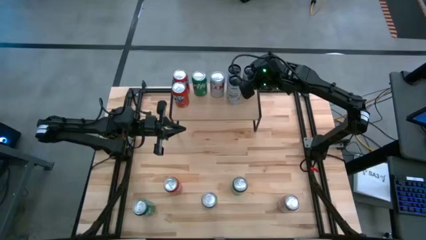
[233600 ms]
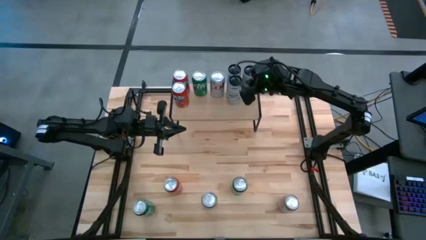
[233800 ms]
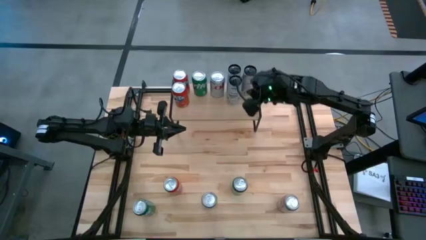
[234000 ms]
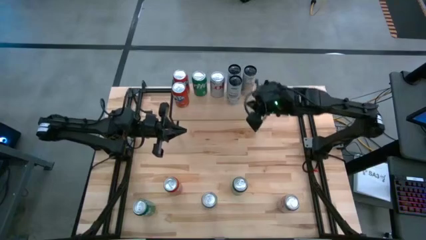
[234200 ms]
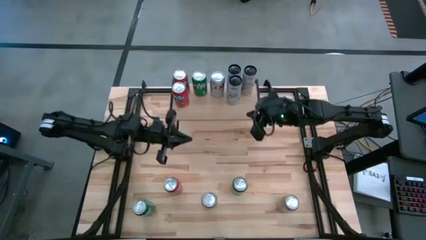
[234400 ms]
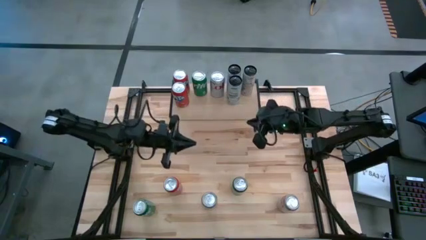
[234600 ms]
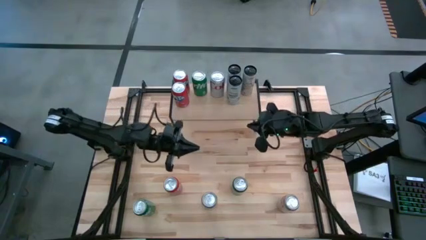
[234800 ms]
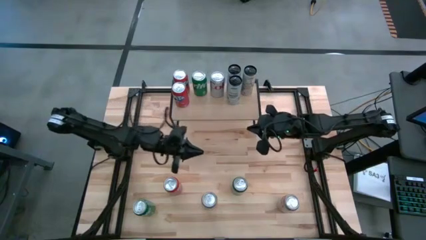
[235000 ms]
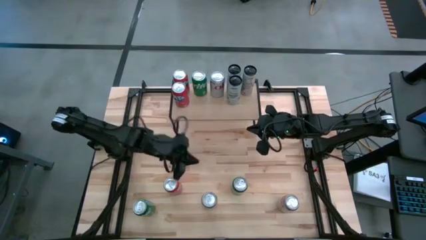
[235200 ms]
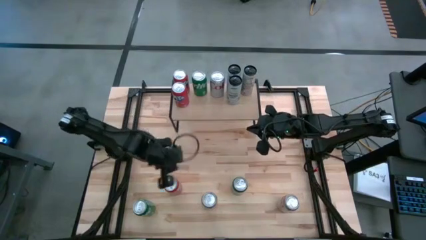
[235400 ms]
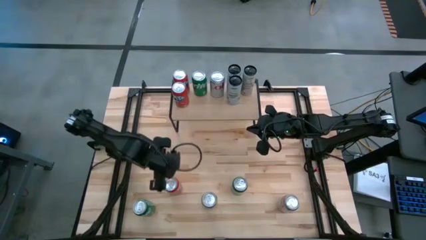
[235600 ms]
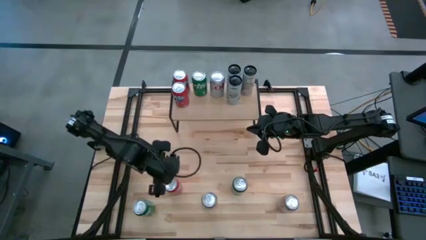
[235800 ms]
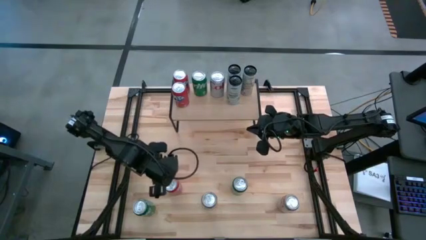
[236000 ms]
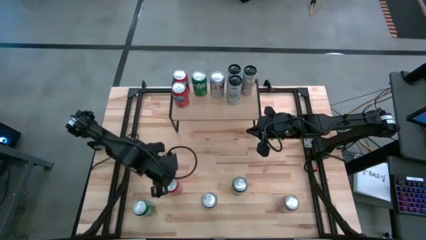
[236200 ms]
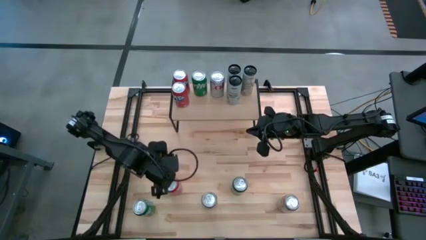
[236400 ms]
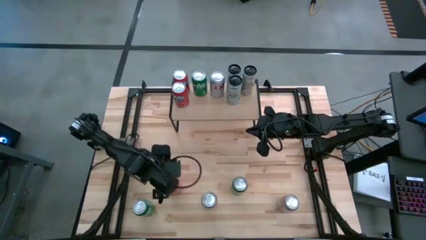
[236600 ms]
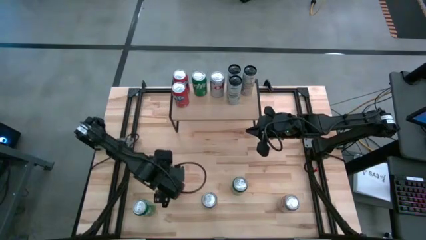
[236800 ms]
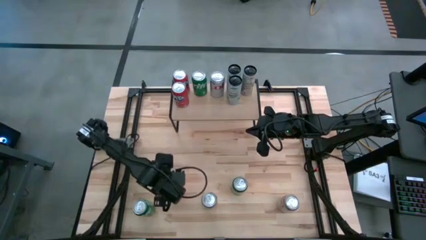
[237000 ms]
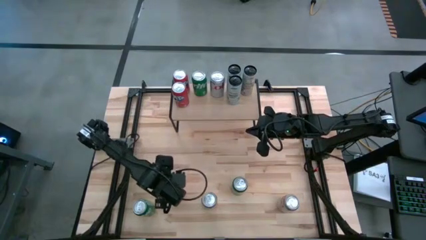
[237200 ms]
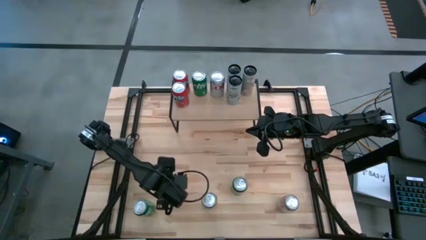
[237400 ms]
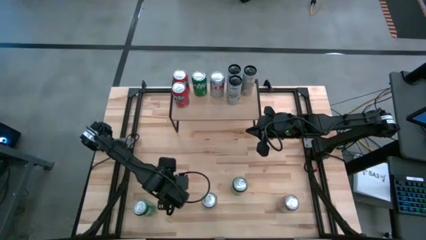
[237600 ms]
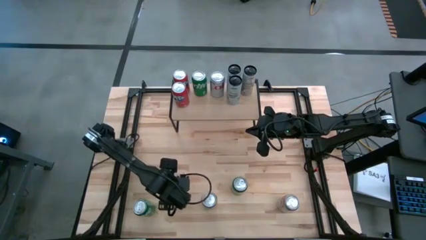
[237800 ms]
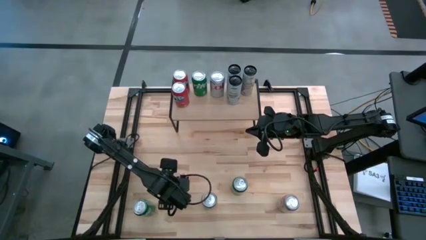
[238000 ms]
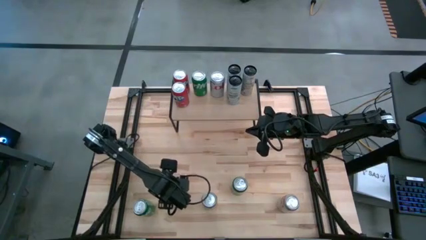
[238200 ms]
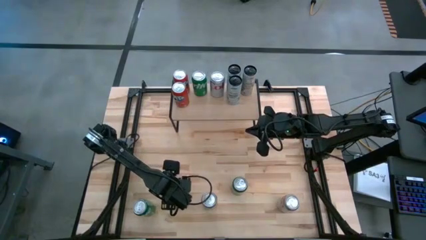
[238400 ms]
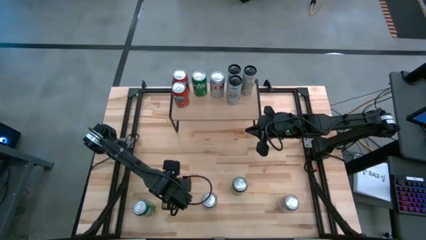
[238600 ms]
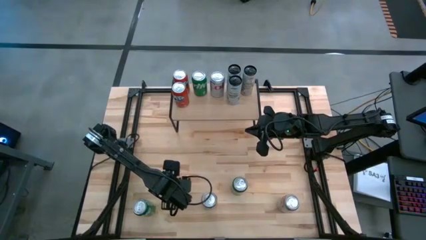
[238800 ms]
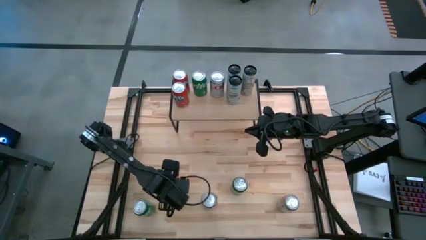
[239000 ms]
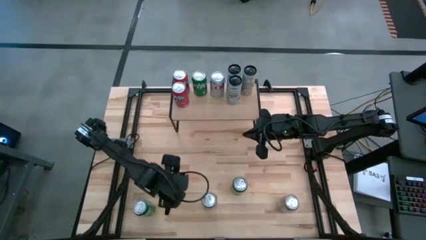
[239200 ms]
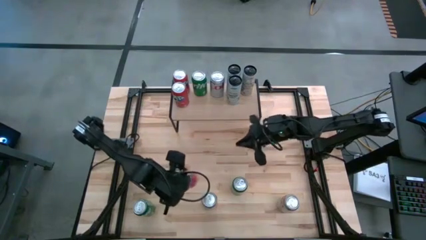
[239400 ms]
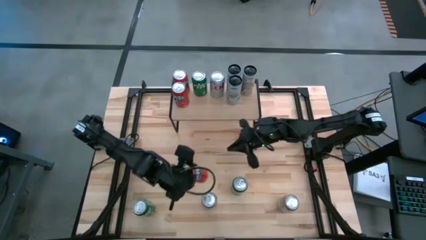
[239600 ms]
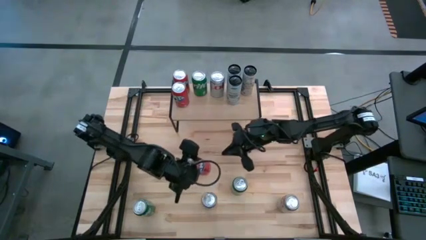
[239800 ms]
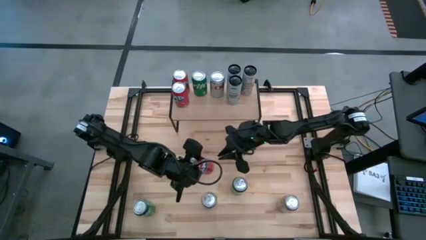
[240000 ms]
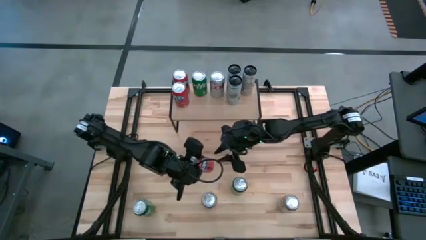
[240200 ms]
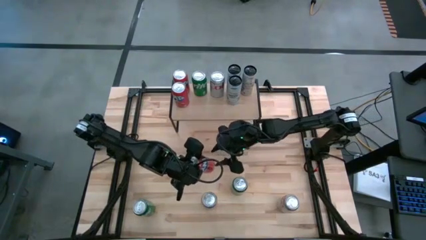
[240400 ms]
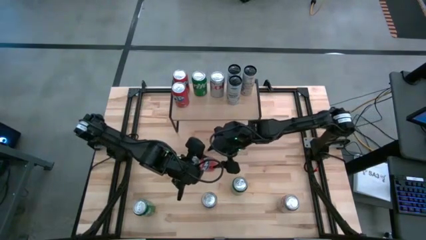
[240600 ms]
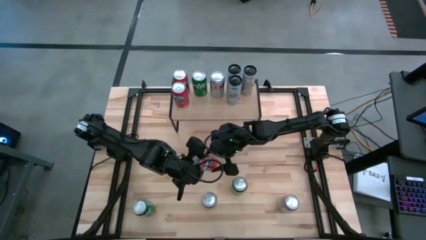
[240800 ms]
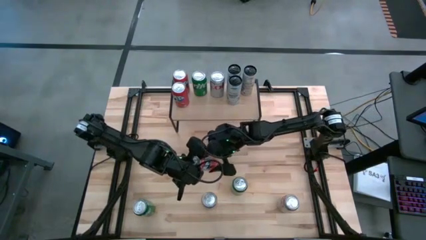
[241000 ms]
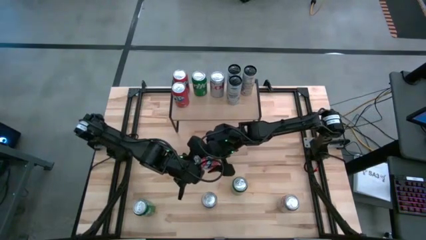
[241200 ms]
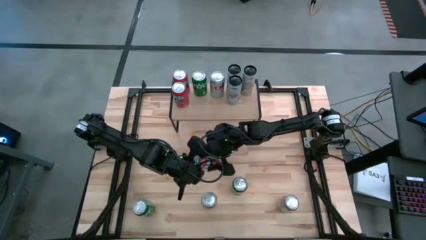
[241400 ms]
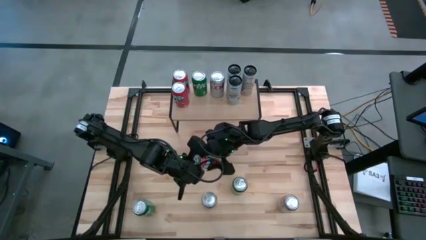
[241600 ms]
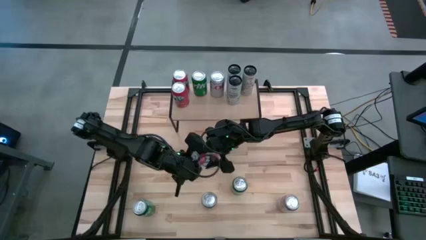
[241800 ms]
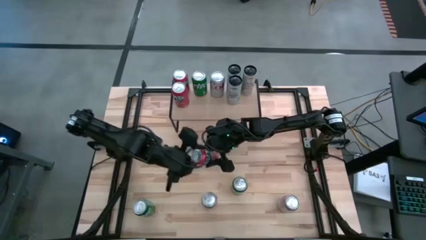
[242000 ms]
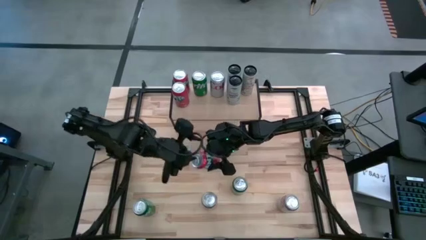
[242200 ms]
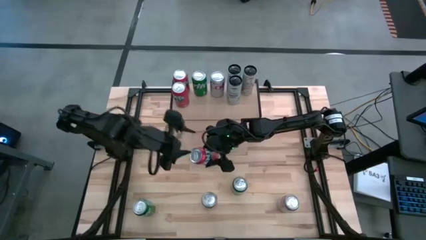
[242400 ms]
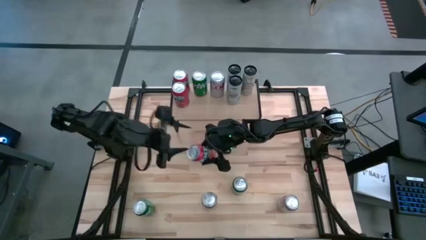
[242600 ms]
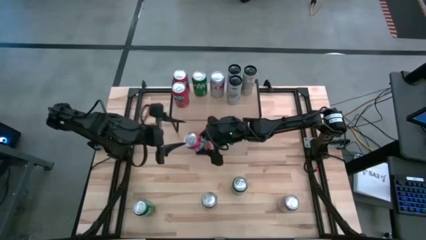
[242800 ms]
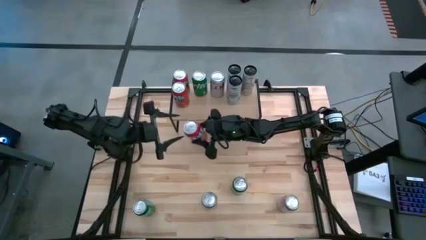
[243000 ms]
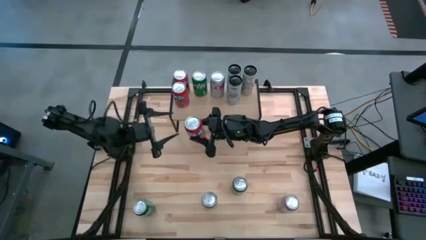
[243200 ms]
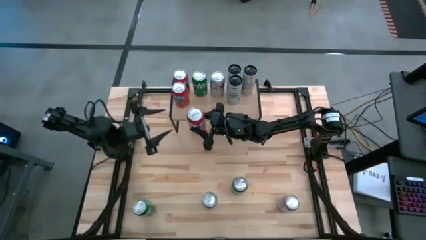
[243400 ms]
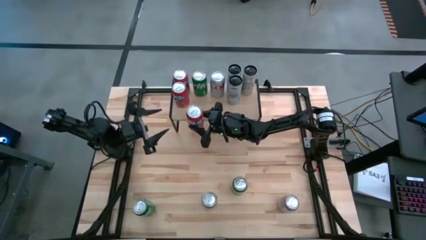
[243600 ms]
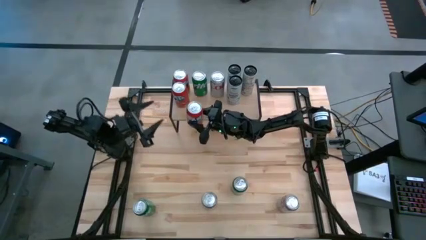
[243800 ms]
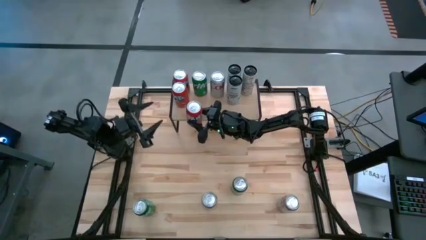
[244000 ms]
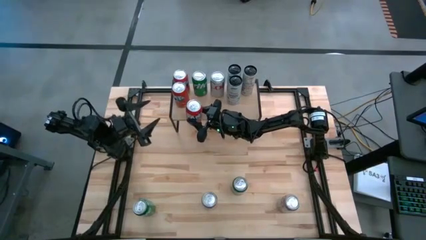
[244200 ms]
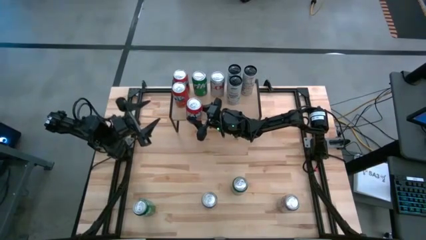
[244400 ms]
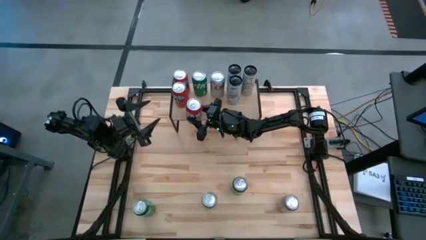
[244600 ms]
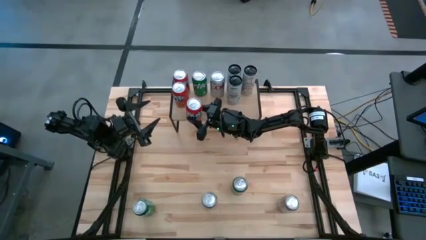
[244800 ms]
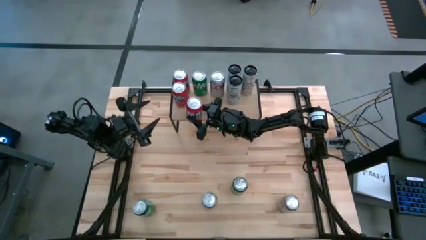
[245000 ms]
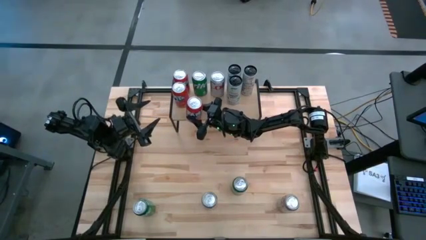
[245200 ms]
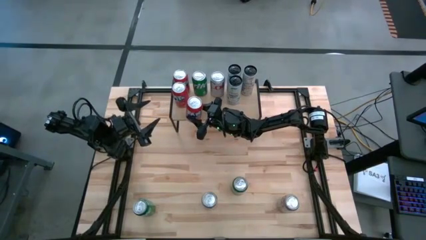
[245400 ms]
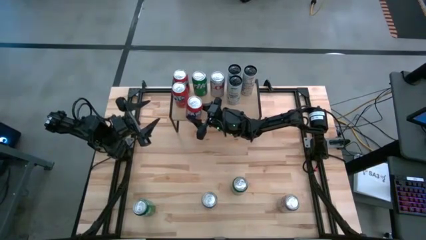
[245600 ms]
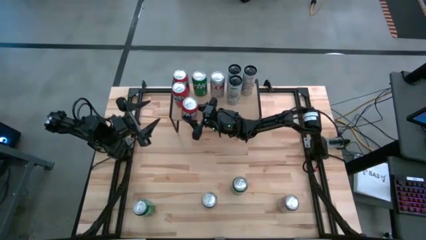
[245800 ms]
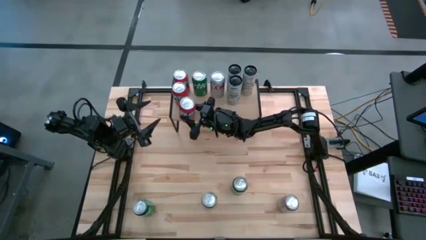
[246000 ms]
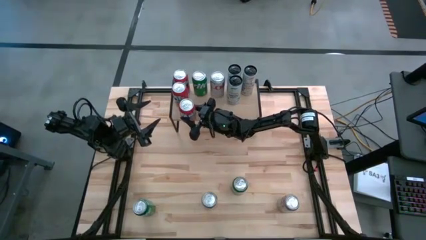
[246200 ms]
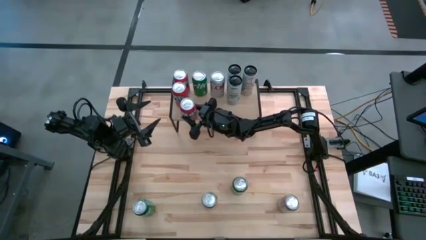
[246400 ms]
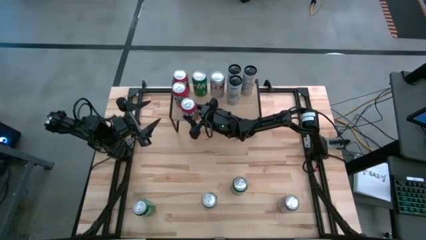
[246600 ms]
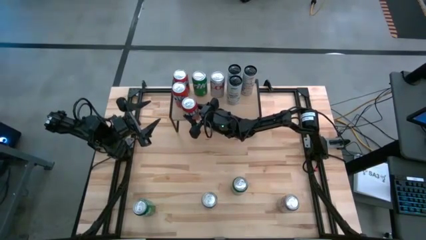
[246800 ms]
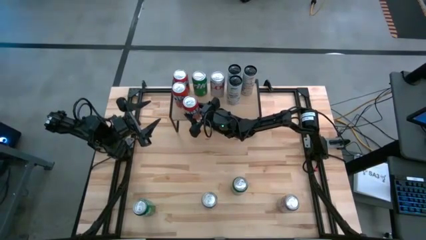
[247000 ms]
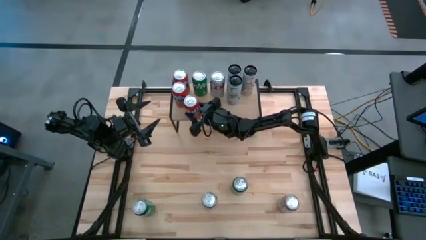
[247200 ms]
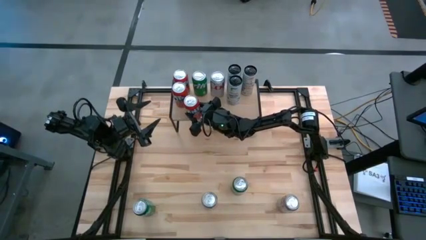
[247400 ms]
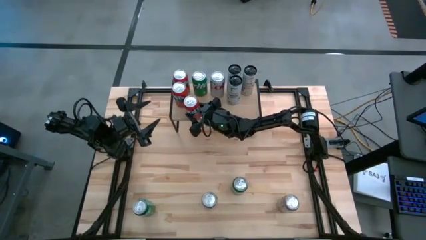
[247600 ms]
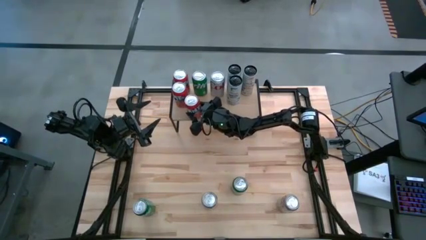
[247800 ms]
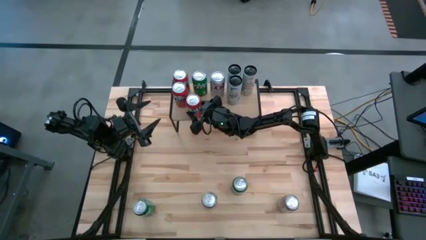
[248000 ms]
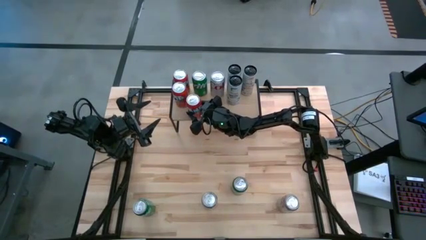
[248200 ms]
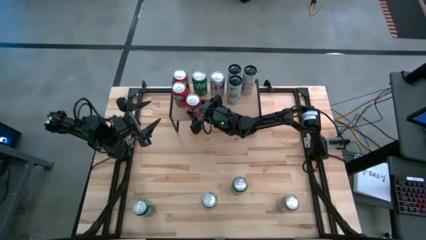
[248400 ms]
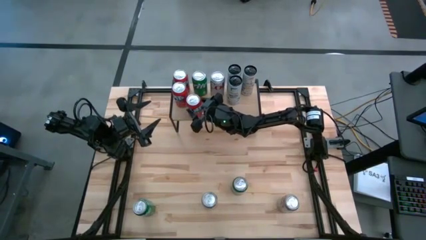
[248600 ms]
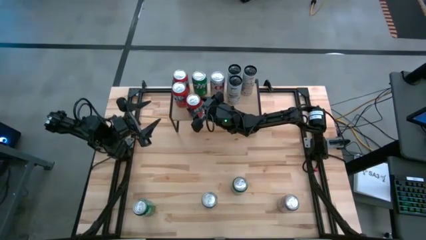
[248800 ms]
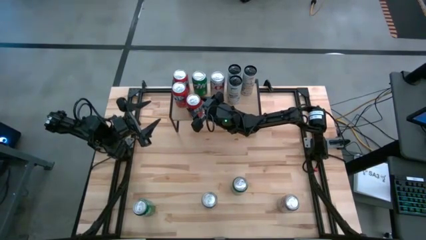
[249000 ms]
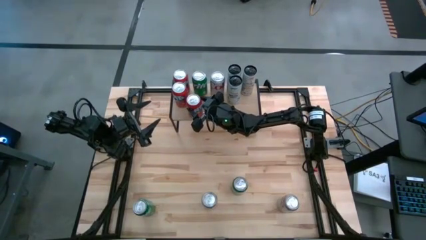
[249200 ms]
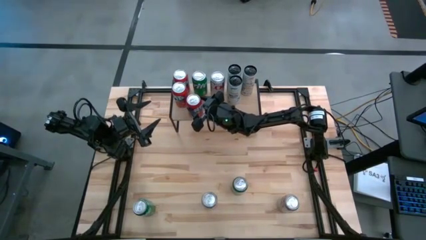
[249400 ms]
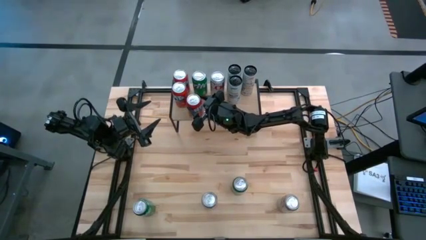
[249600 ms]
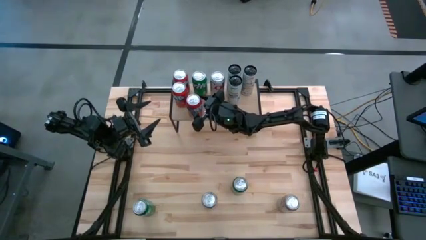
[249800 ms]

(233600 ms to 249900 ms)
Task: Place canned beverage on shelf
Put the orange soda can on the shelf aligned with the other orange soda can
